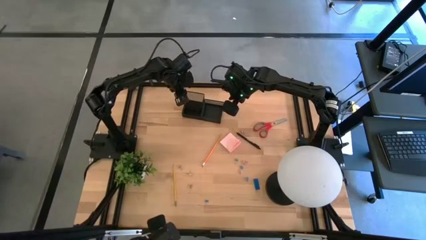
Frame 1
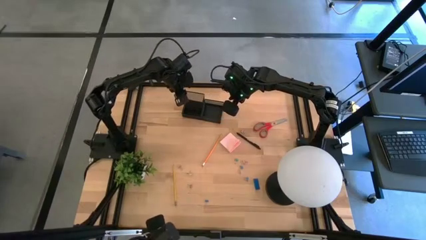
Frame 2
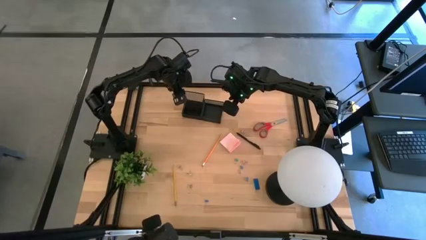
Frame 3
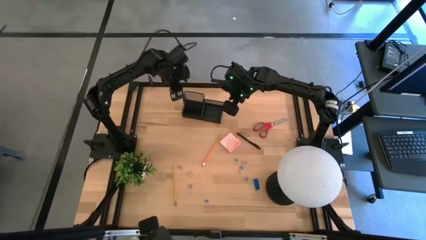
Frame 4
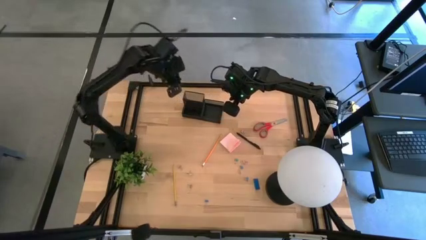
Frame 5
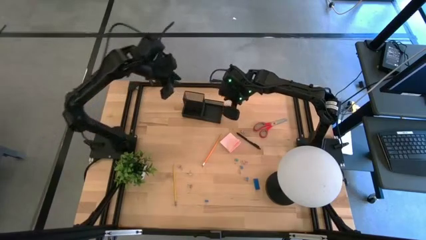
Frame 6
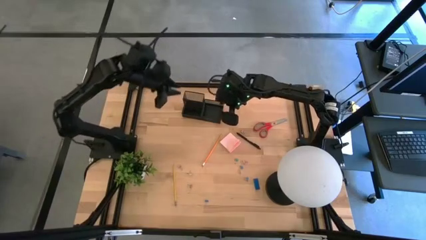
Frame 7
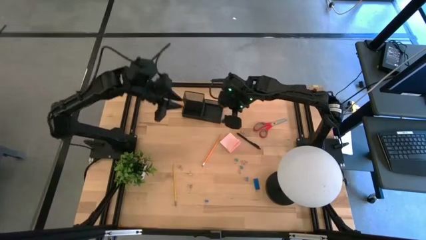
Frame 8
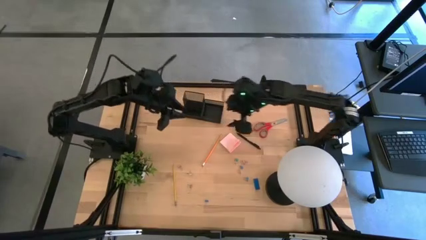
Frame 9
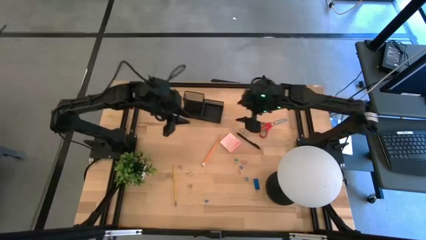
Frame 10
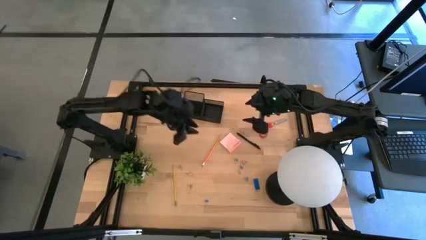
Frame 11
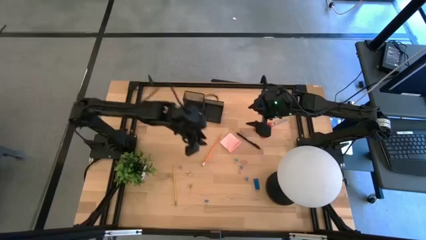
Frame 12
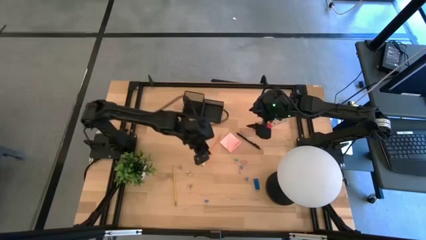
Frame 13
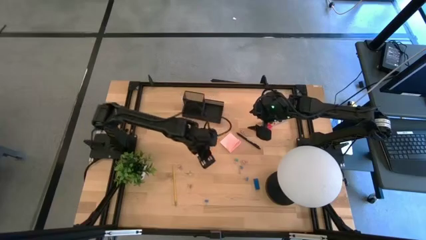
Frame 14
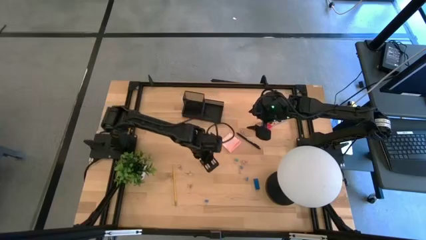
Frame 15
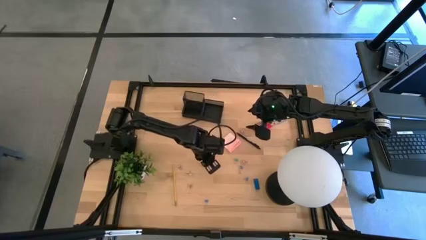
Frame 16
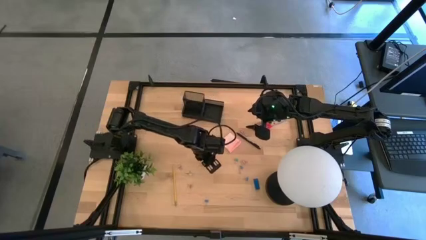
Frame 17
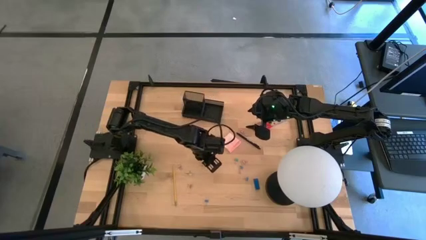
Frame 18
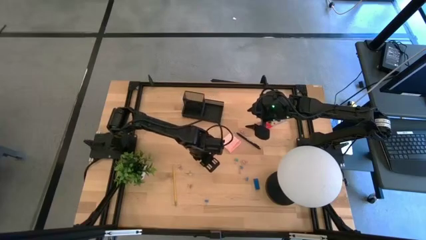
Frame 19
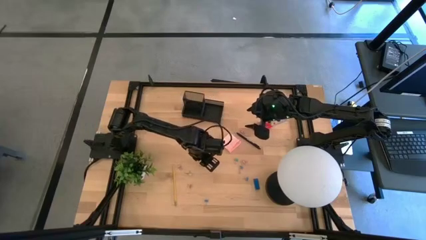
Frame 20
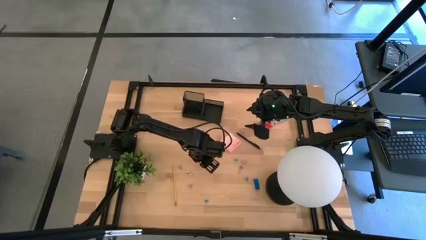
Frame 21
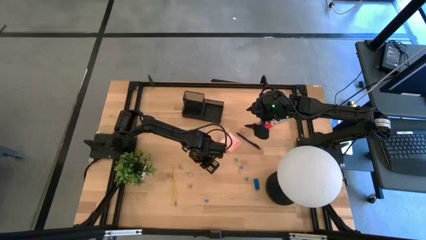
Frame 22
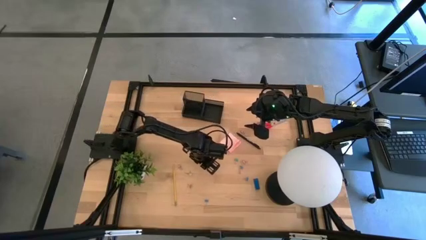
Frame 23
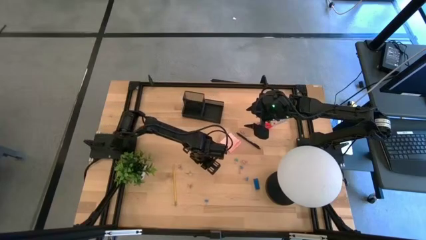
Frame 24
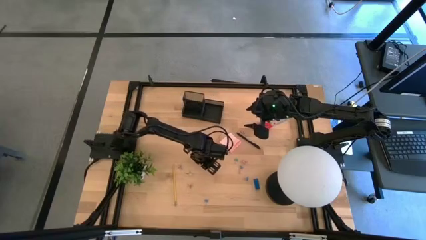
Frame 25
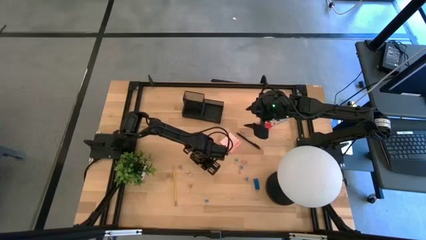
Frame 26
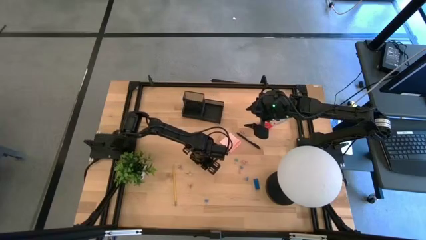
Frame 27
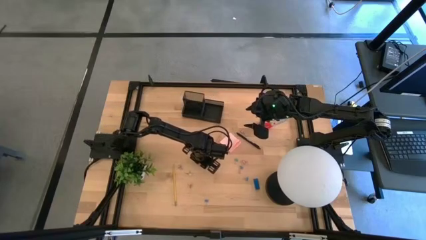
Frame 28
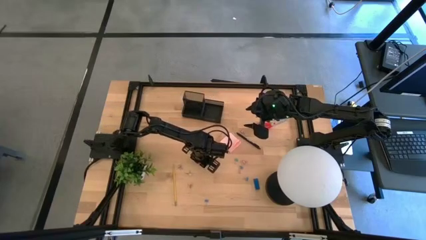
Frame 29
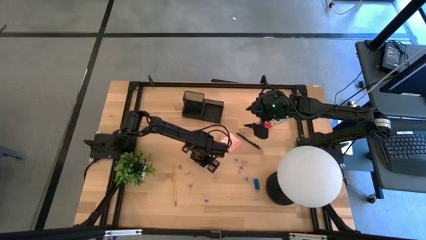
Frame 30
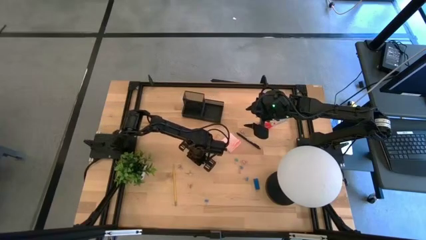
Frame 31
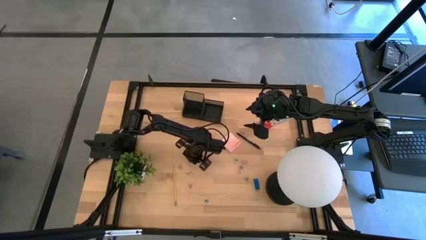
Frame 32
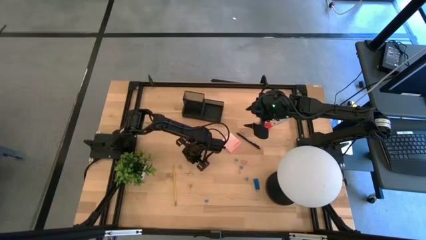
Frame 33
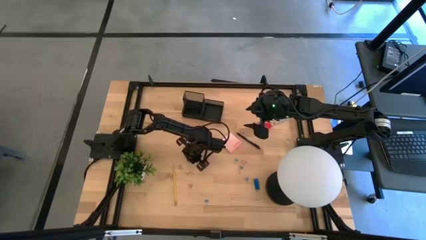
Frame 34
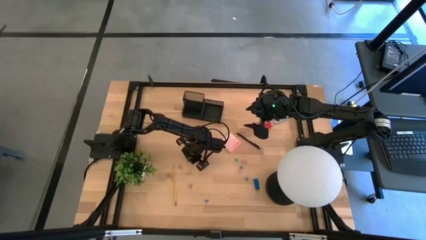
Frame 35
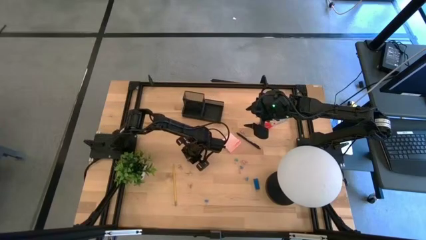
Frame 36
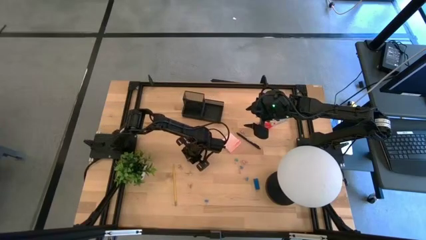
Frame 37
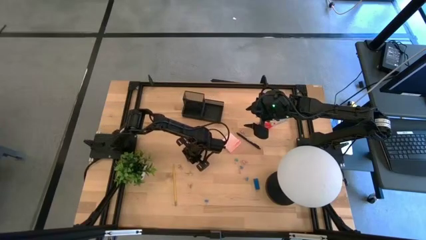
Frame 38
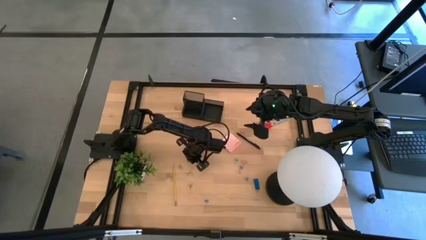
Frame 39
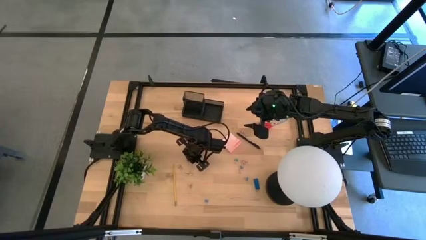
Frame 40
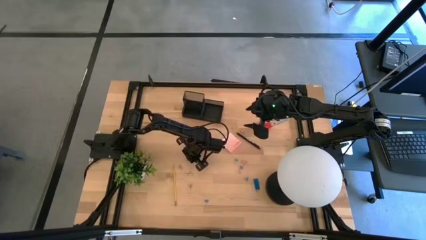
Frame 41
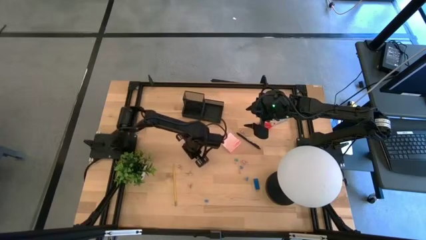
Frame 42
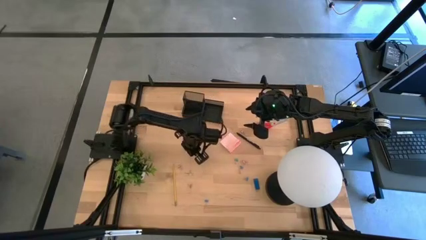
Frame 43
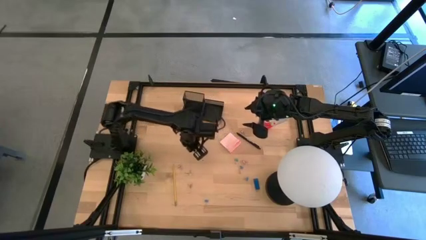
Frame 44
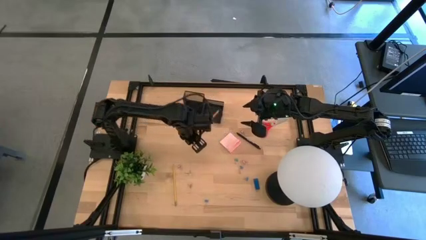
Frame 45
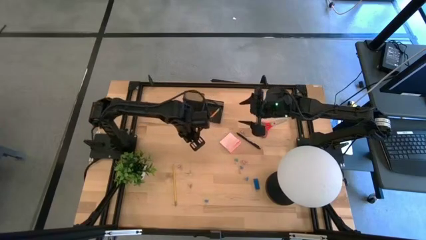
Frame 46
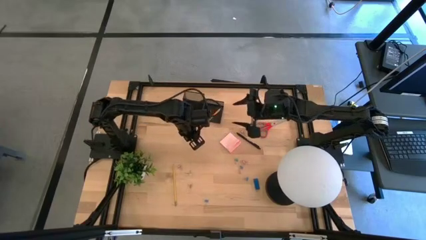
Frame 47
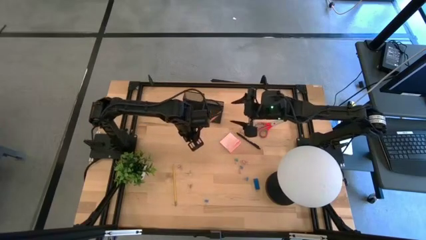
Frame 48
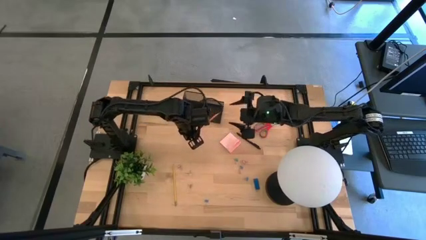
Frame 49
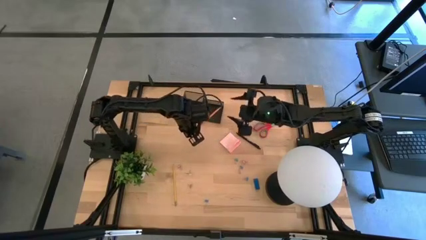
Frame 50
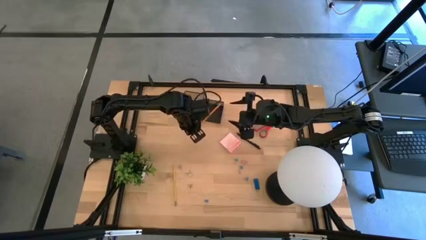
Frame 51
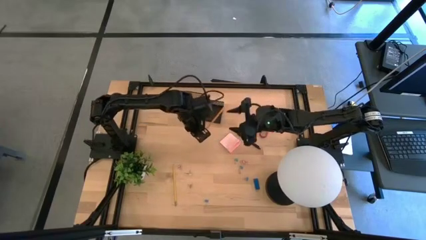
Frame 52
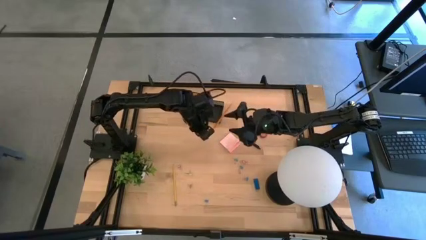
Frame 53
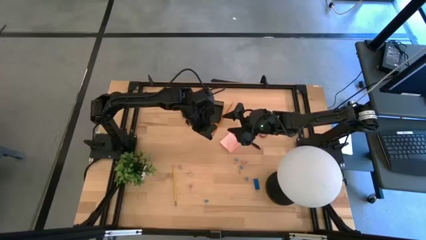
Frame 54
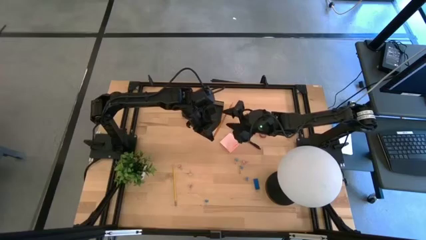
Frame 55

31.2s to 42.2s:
Task: Pick and place office supplies into organizer
Put the orange pencil into the black desk organizer

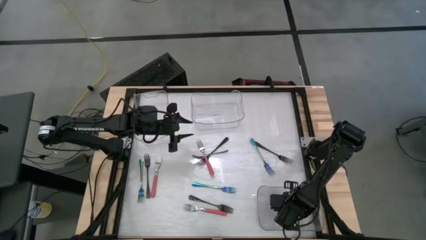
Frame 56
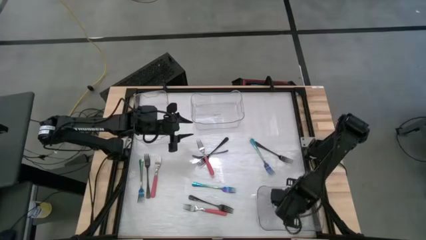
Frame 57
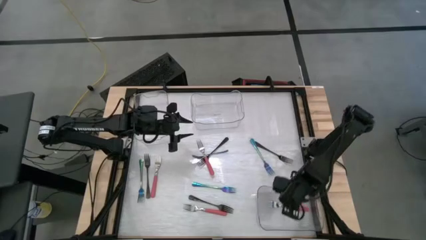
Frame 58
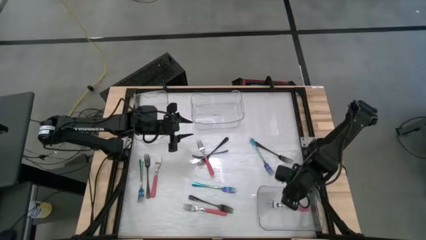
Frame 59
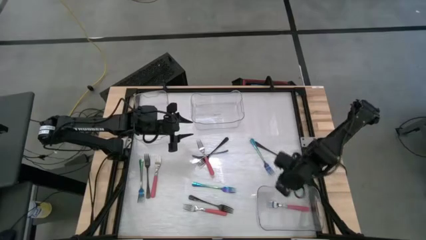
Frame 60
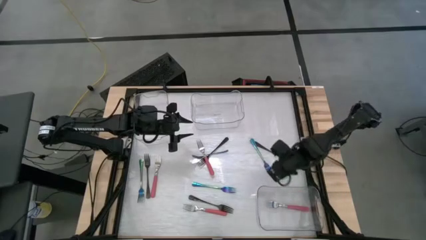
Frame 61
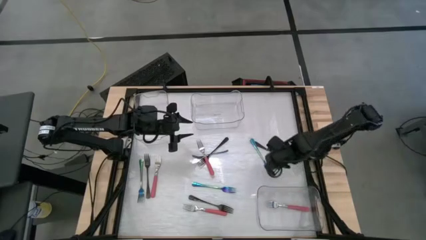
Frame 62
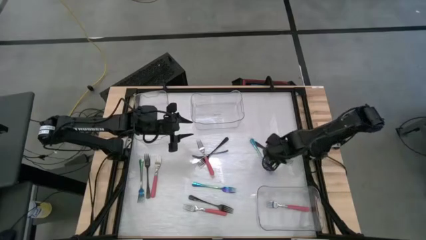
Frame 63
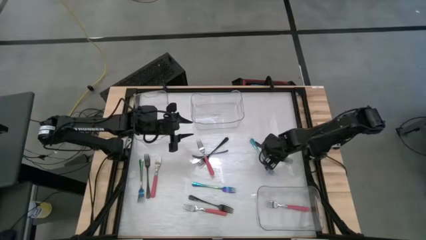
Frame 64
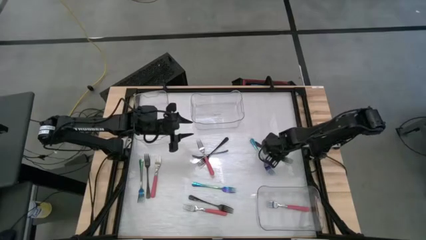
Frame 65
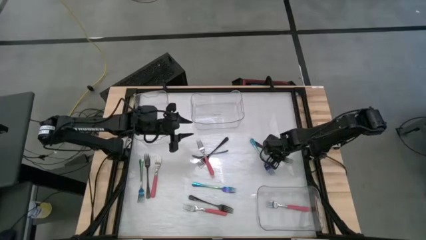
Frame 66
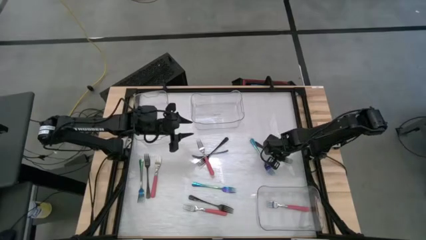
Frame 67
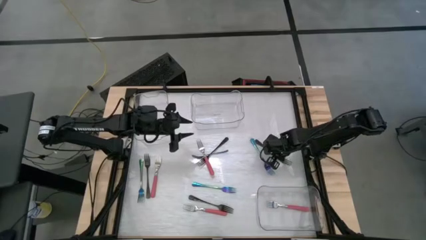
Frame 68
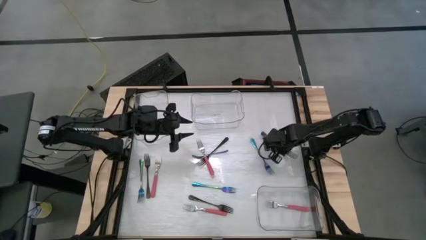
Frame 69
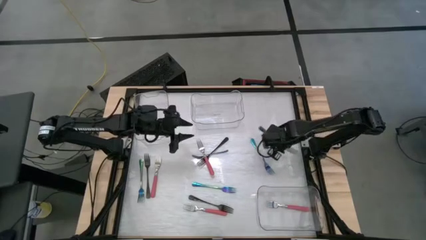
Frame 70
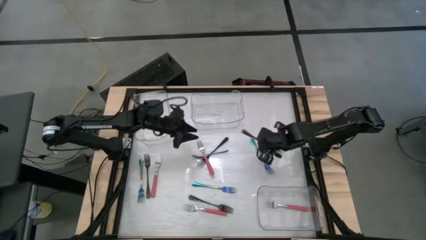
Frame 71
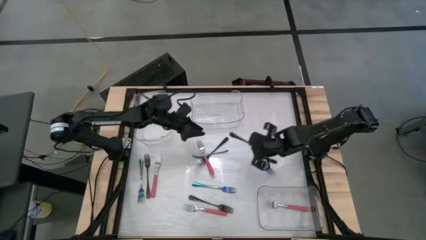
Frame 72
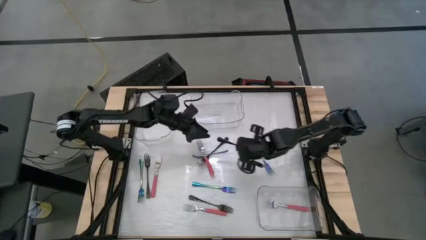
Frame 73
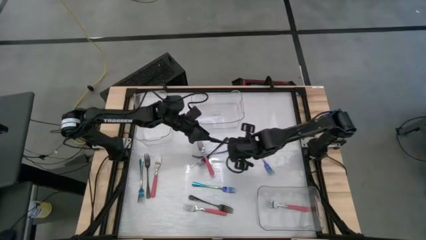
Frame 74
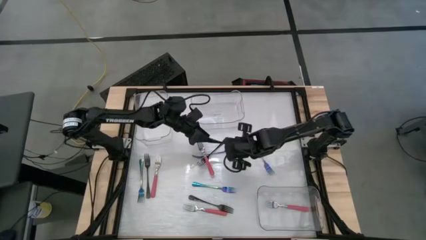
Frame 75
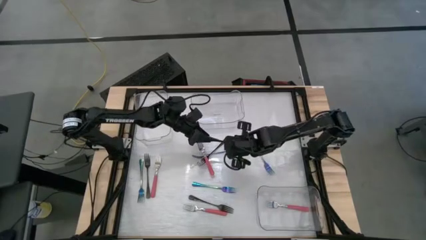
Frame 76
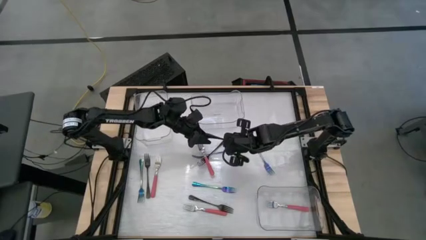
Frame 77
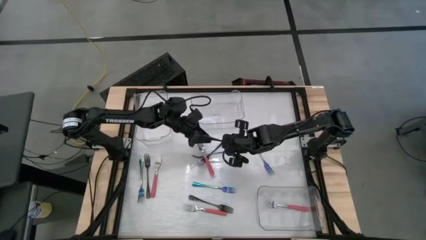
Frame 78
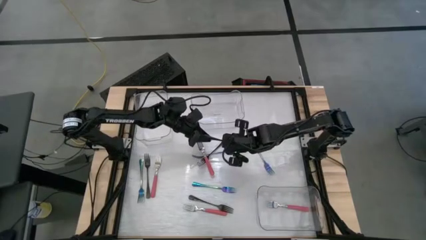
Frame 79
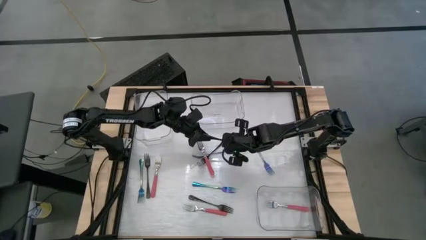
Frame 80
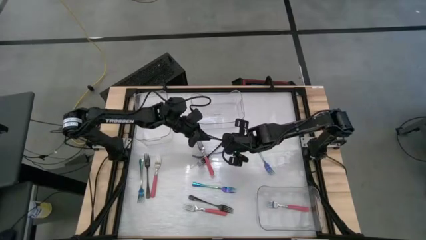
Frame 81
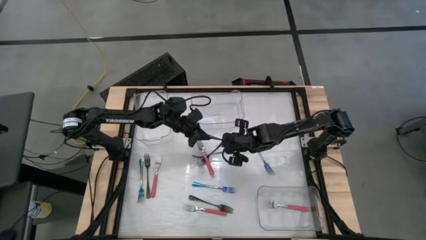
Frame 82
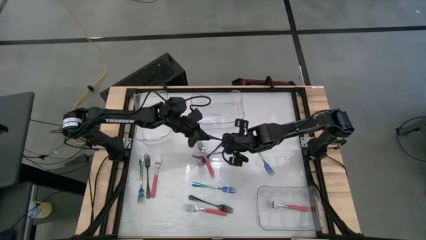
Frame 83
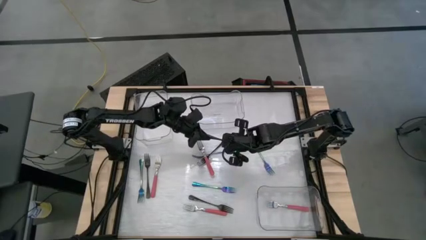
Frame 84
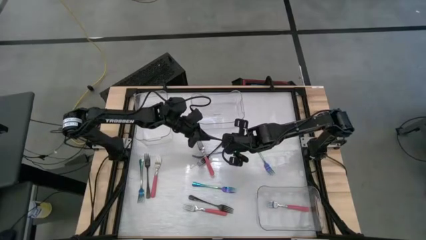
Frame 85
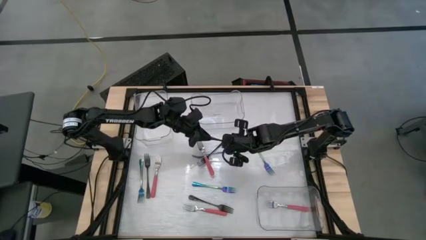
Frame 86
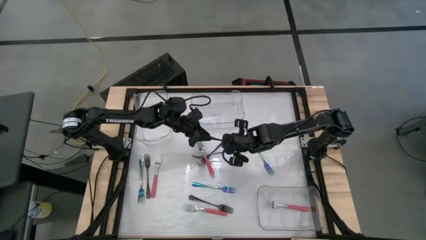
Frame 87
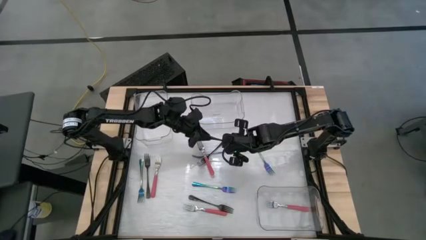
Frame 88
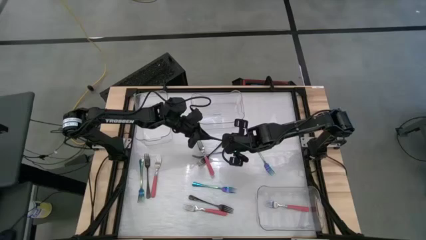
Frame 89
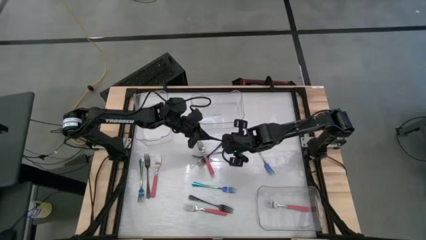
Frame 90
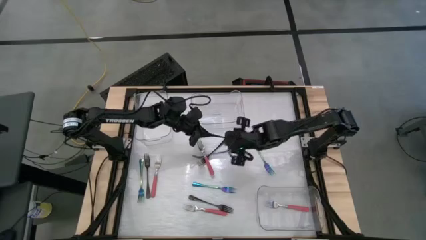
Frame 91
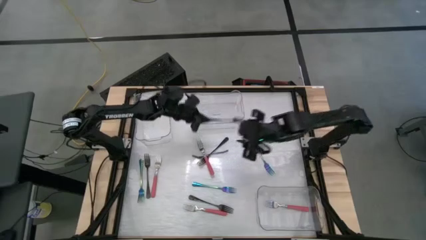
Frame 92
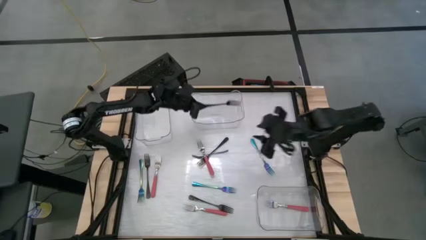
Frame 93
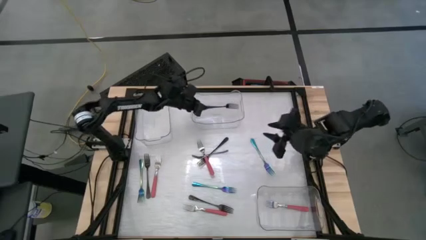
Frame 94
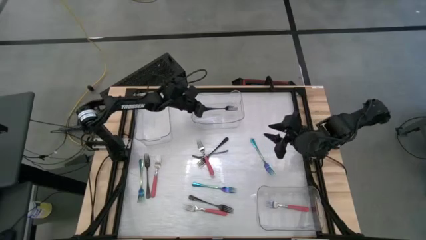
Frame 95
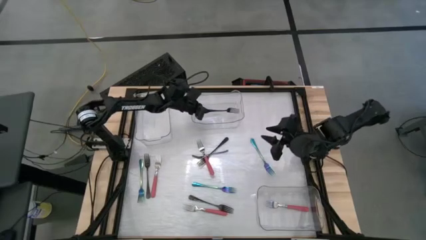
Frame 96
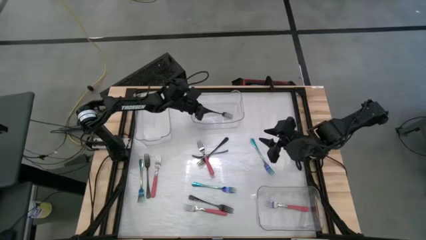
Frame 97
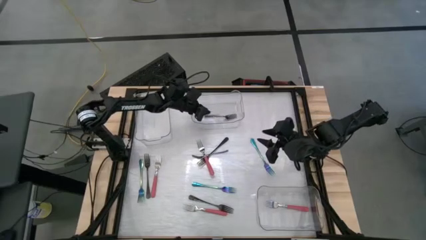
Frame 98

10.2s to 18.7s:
Task: Sort silverware by color (type)
Put the black fork into the top right transparent bin
